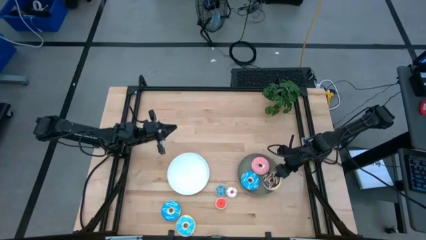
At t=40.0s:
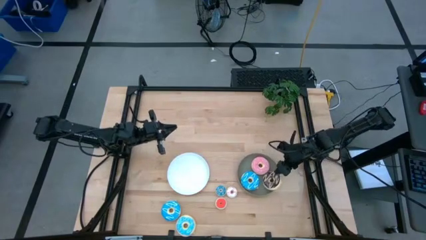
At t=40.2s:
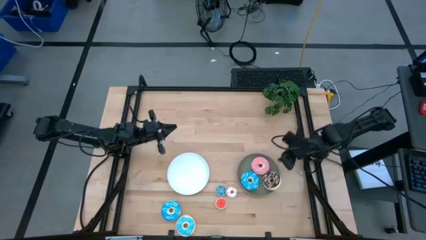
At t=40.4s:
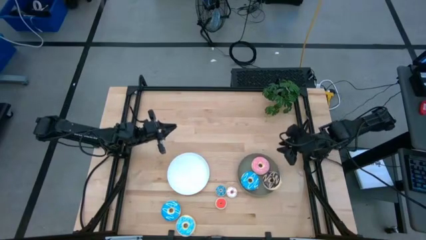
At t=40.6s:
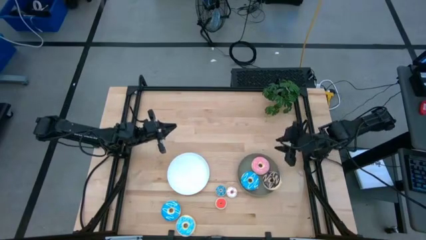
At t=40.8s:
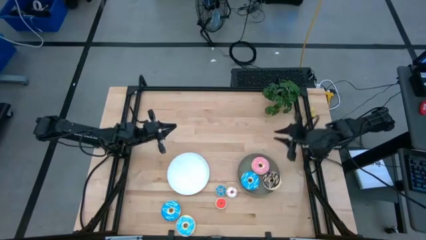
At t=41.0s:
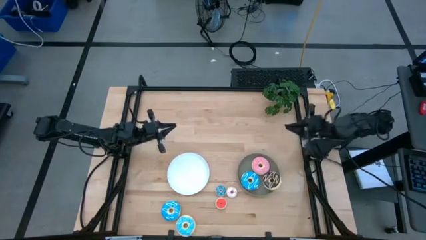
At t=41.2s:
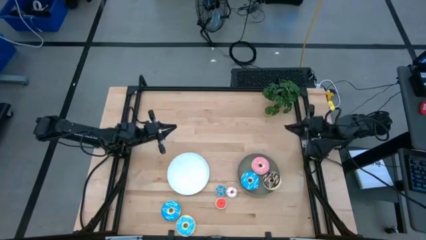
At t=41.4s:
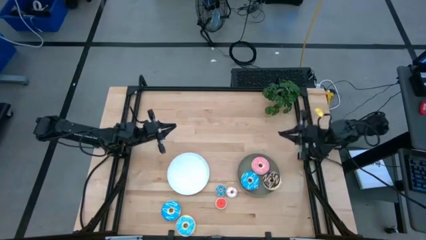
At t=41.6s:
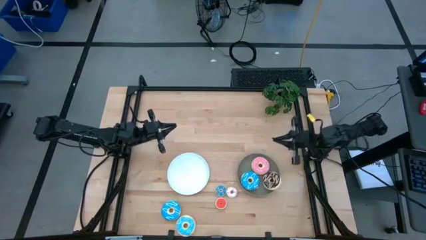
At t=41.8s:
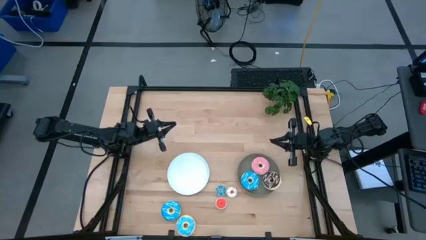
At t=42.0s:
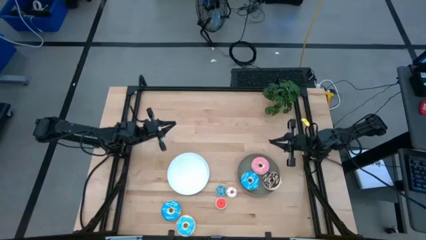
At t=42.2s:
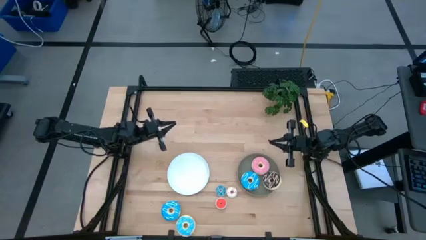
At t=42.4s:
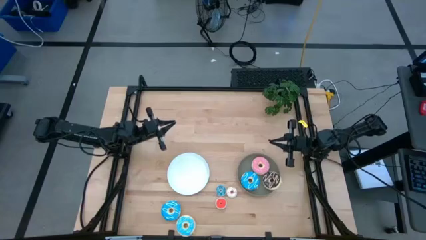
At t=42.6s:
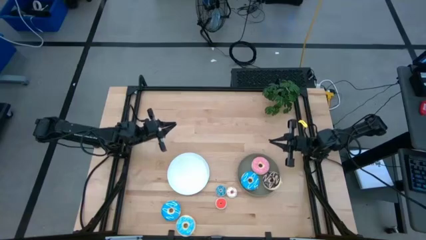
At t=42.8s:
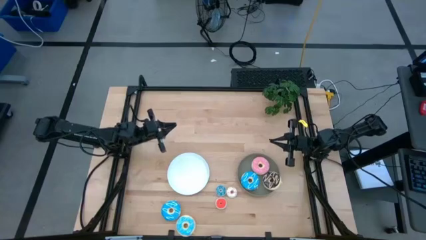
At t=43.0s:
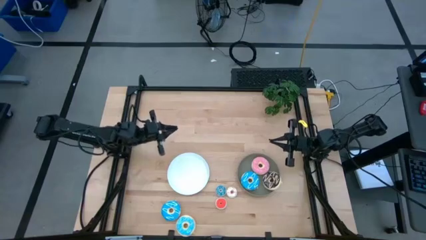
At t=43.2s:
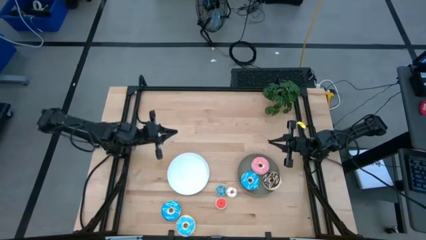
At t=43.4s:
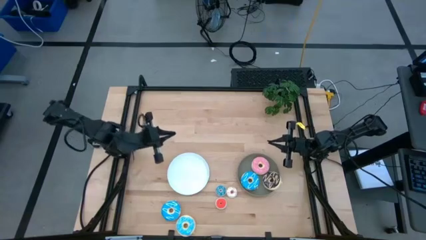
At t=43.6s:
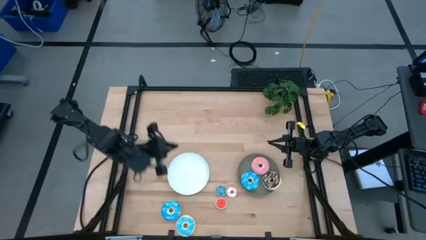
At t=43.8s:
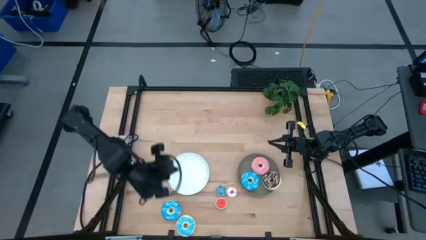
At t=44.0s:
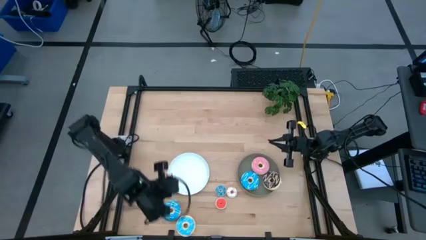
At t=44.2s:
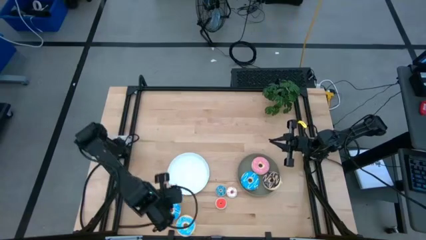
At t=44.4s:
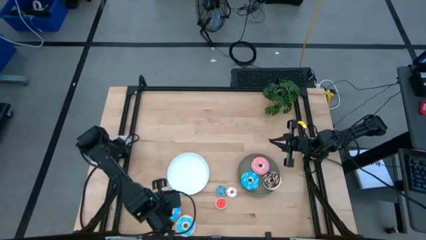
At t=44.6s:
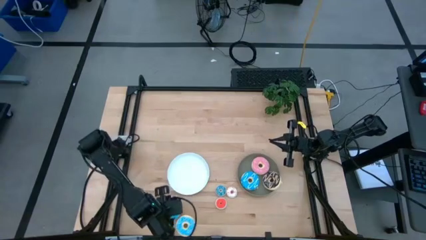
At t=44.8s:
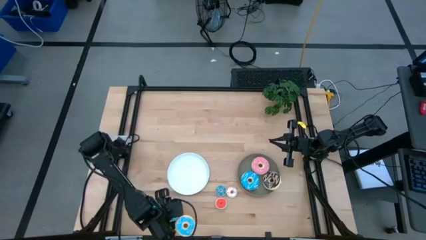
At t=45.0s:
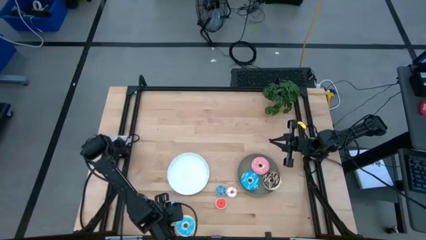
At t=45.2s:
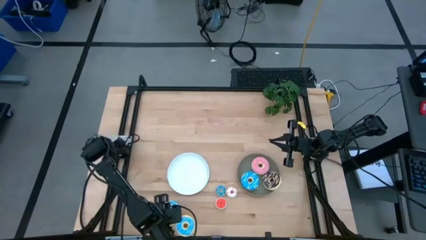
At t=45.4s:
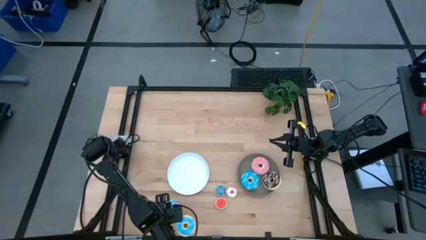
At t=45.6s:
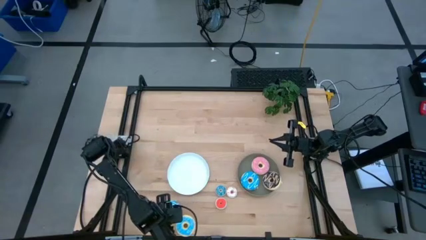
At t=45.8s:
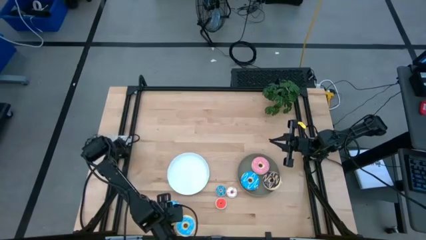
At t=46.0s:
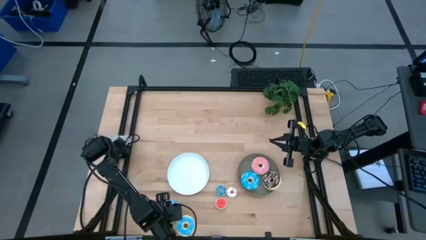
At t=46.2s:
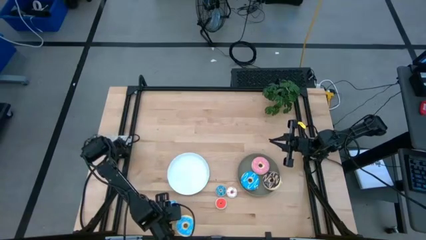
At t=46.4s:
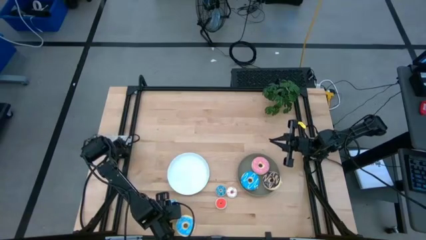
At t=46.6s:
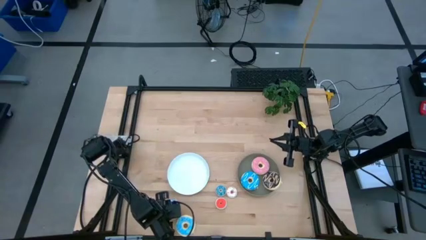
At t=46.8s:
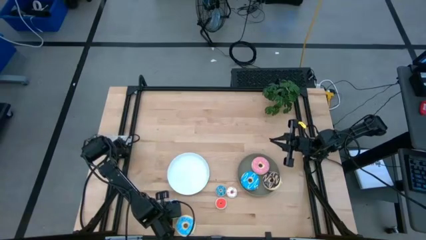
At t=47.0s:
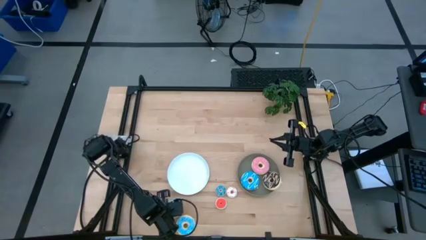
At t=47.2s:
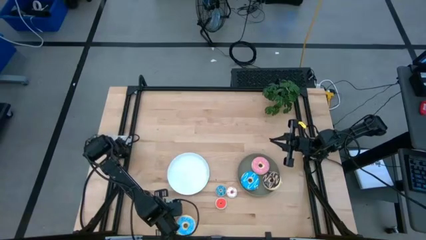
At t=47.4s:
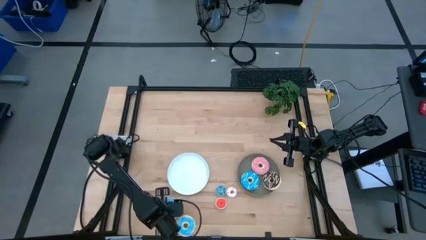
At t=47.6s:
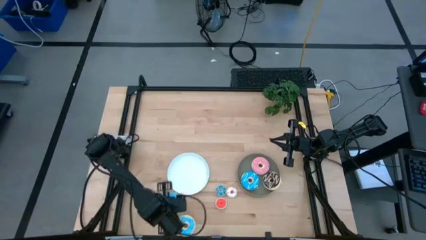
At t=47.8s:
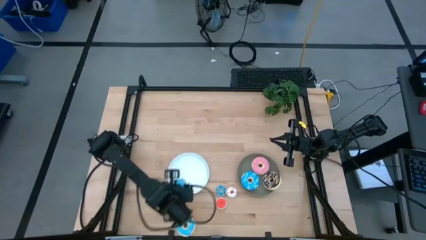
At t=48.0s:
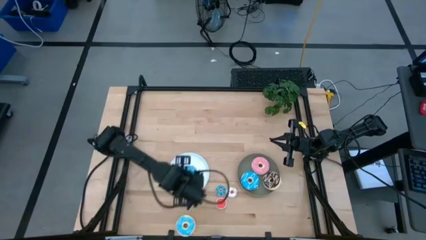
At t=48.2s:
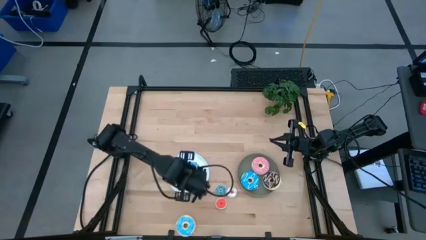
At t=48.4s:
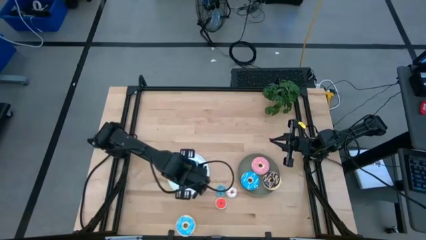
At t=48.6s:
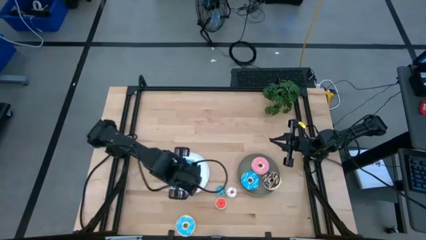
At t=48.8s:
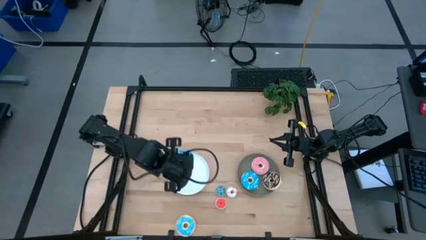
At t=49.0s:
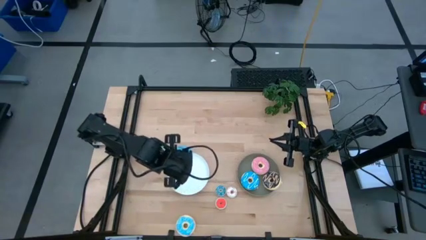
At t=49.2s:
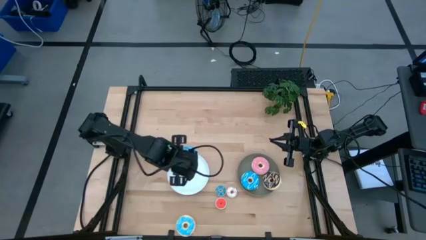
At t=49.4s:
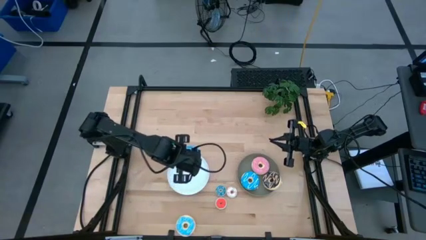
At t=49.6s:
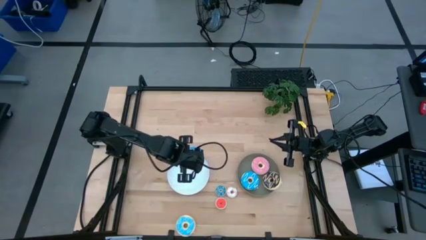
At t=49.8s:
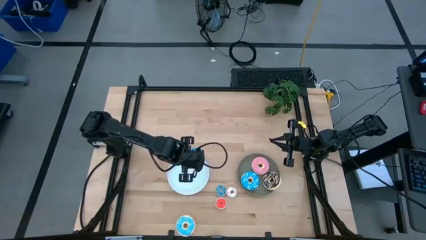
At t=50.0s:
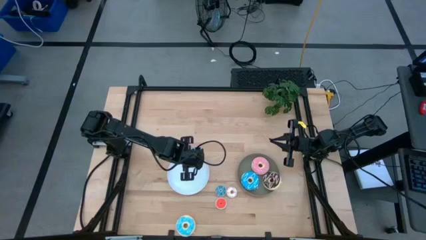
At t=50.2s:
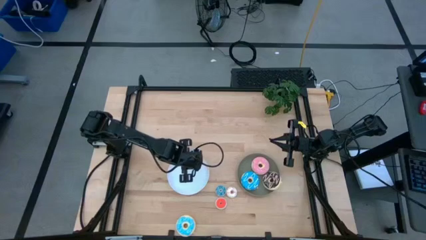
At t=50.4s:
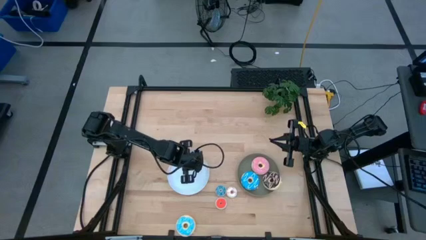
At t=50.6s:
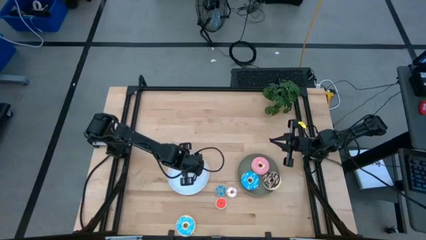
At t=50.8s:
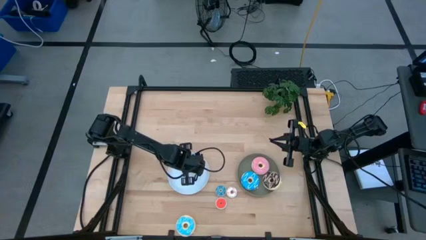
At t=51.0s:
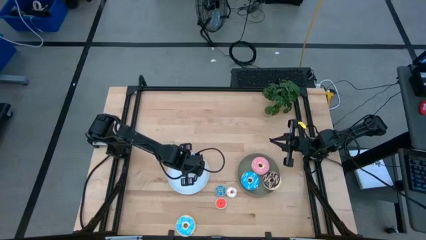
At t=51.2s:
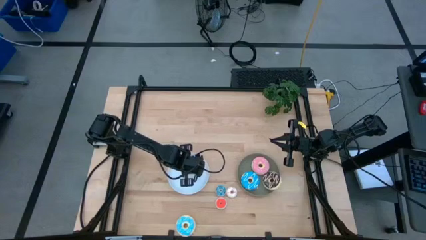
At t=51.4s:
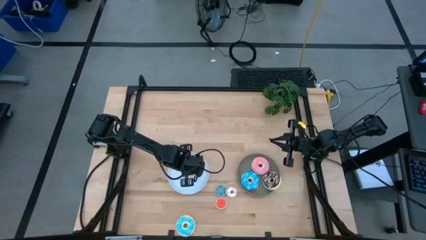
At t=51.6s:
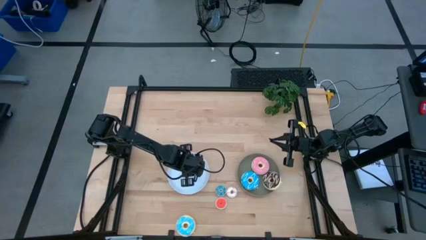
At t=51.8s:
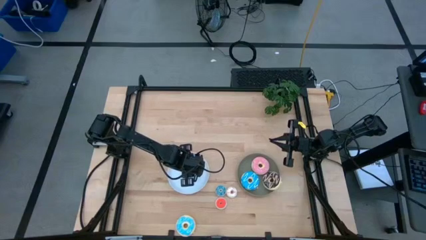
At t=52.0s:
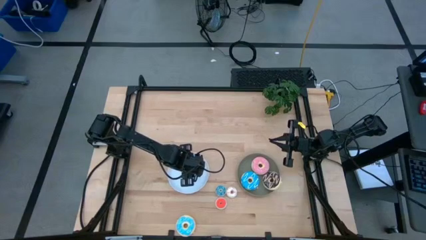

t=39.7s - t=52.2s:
Task: Pick & Place donuts
Put the large blue donut on the white plate

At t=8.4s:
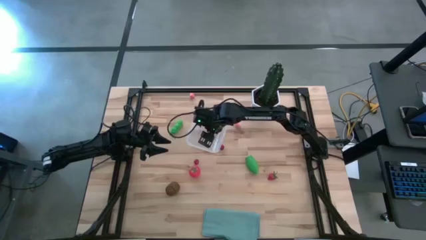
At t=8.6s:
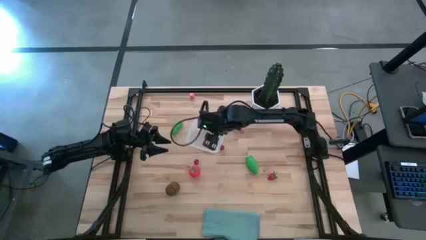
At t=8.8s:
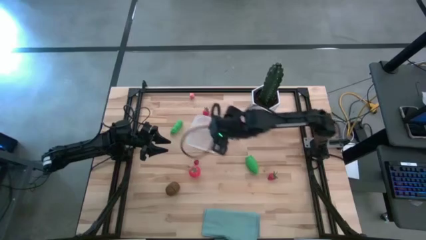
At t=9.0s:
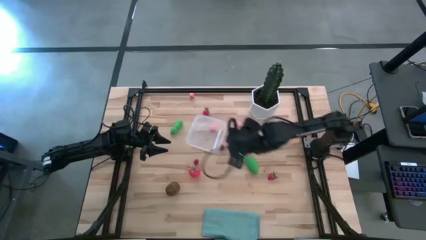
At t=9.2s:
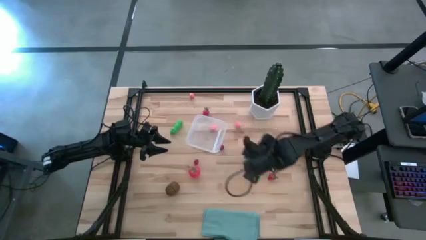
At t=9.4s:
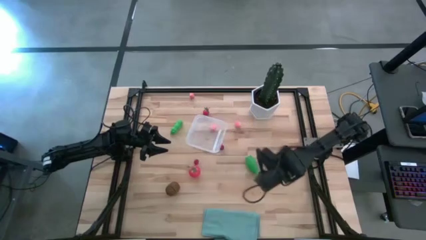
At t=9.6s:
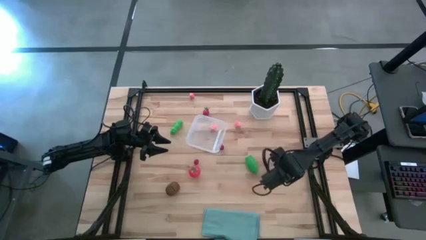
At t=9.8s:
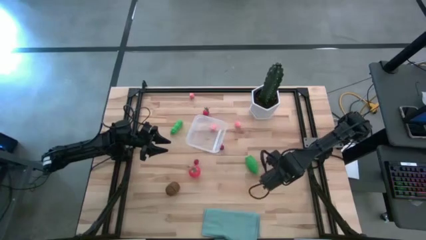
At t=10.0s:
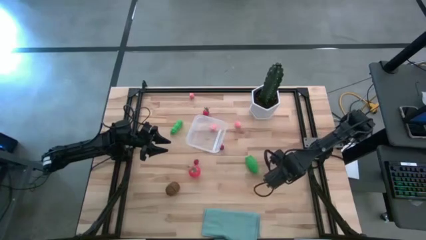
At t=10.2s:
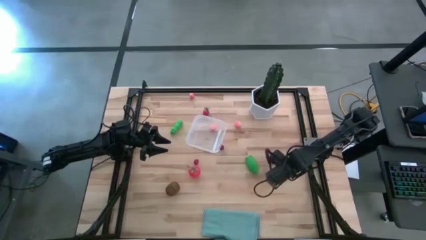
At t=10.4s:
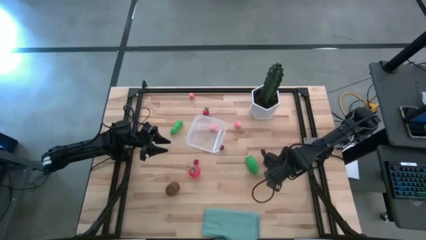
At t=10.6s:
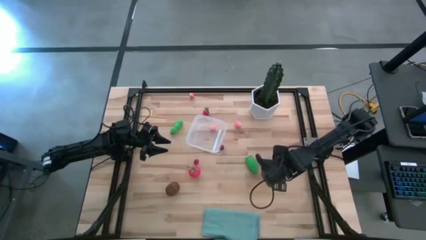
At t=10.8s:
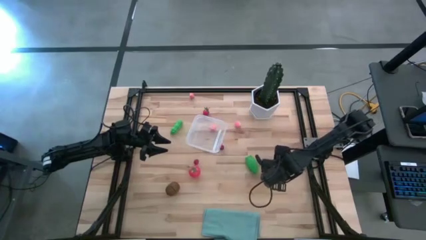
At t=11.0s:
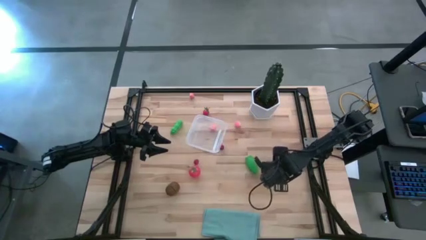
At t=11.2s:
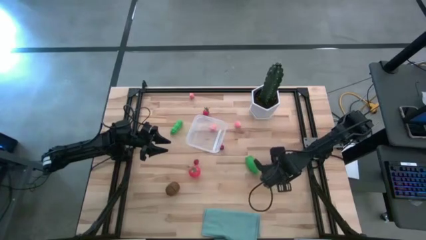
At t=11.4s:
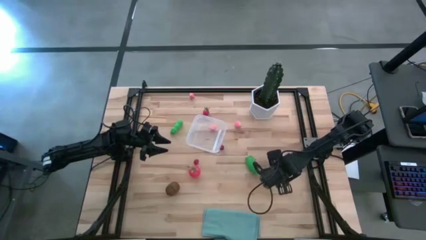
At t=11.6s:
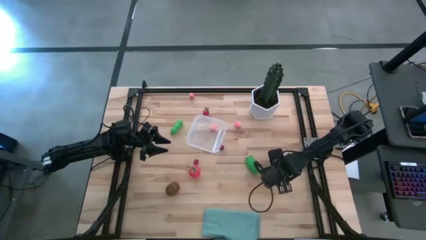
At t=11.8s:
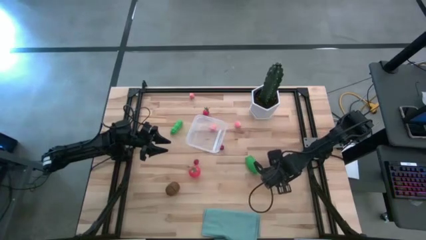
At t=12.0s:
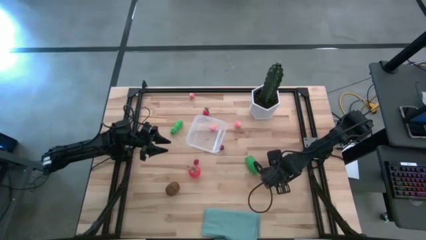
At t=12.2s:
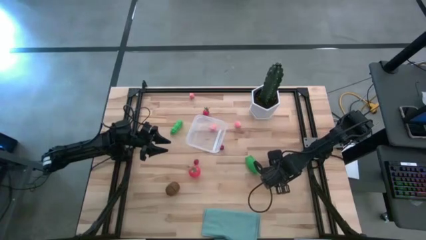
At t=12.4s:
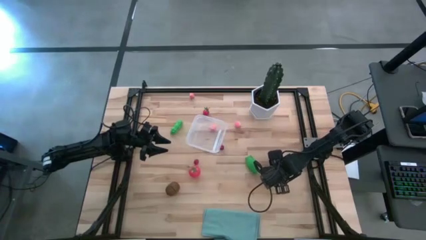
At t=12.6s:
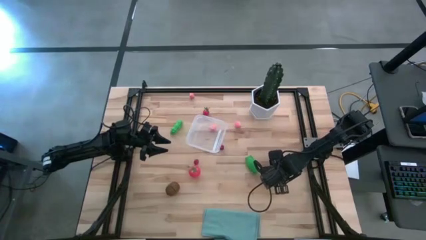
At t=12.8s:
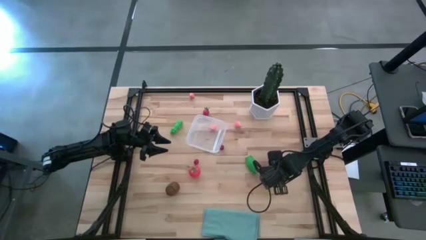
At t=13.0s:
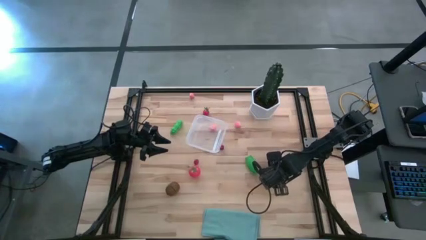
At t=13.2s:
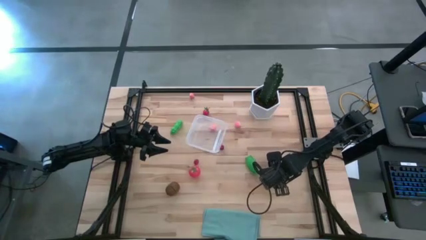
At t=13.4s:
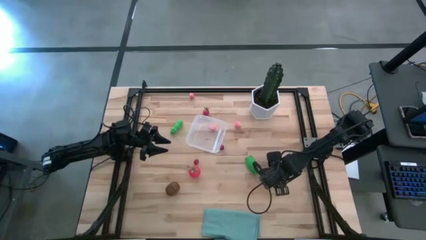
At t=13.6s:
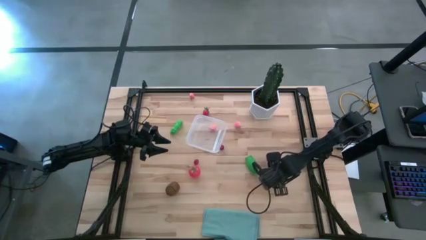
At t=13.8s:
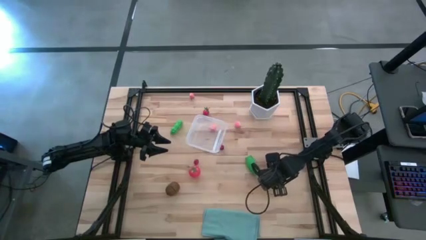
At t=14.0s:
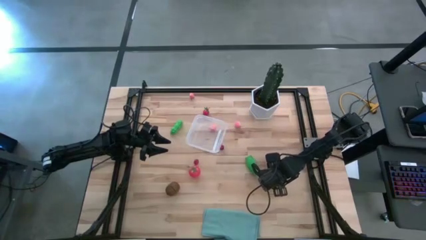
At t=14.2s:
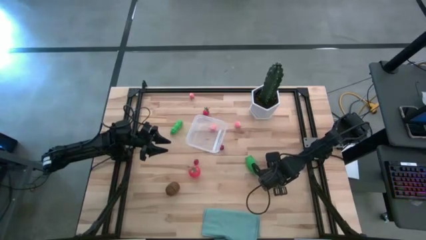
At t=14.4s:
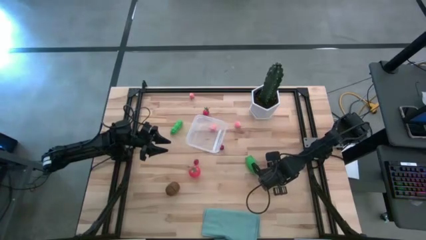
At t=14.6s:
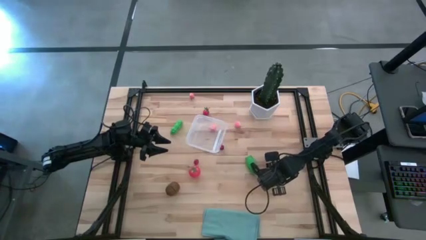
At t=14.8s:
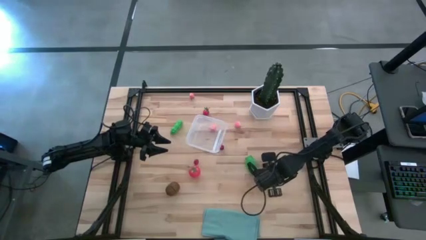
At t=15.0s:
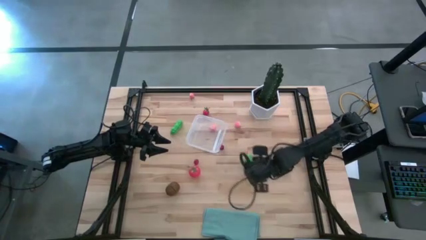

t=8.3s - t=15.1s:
Task: Pick and placing Produce into tupperware
Put the right red strawberry into the transparent bin
